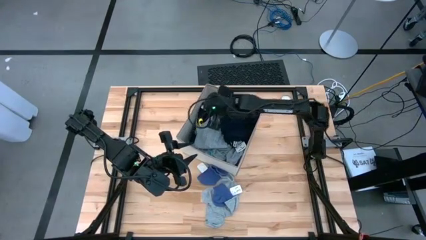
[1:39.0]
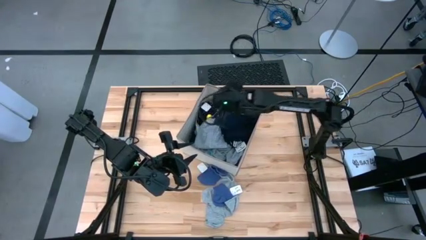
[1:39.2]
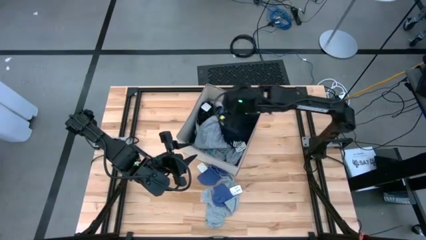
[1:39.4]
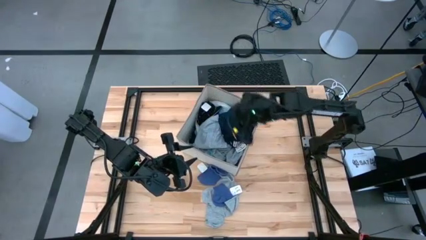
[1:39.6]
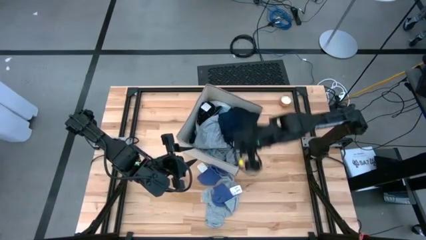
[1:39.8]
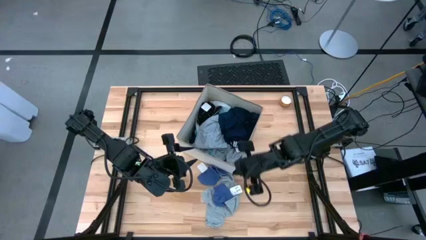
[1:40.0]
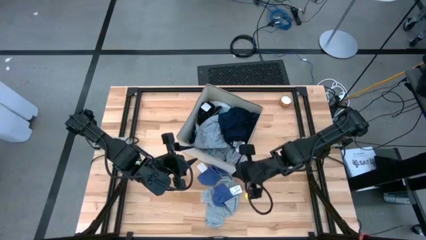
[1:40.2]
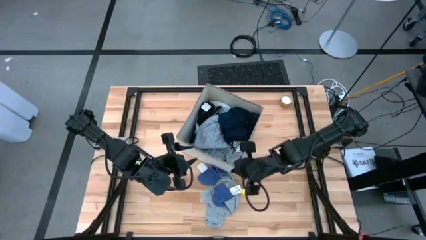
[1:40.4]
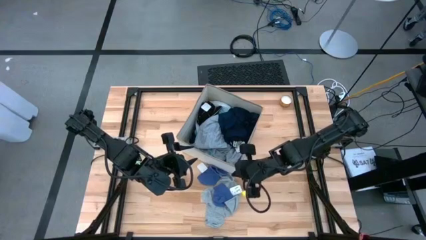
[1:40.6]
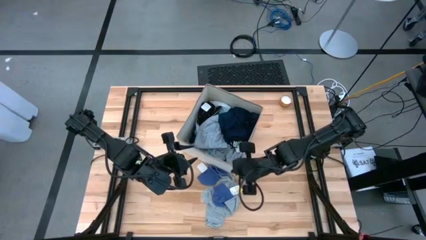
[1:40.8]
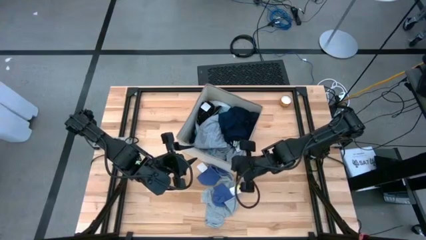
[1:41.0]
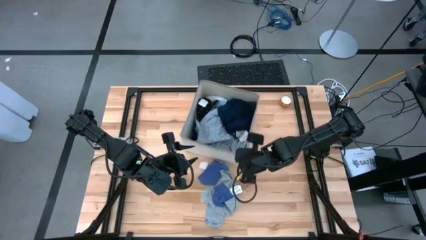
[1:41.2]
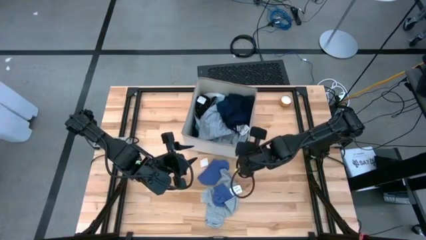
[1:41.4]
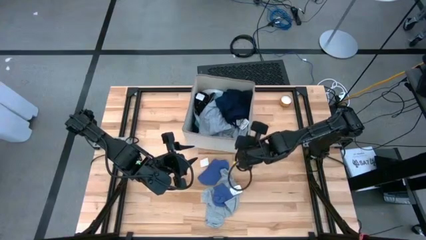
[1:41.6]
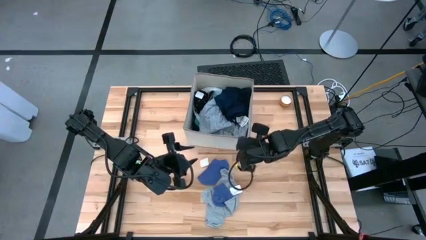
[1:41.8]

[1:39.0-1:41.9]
Task: Sort clothes
Move the bin to the top of the table

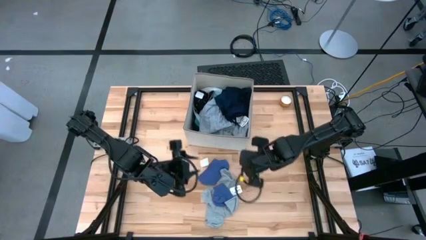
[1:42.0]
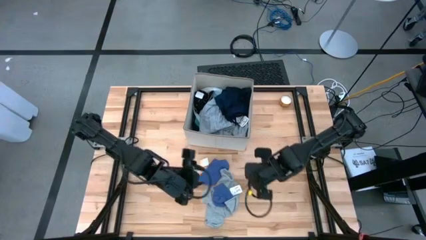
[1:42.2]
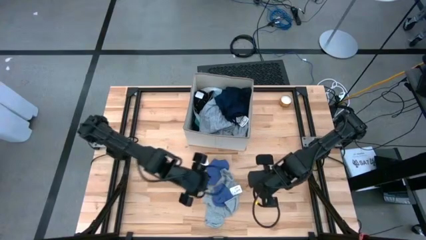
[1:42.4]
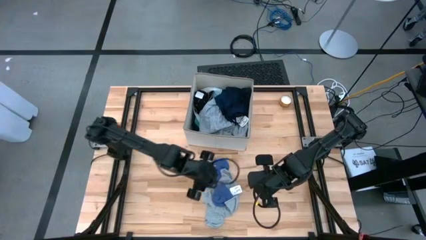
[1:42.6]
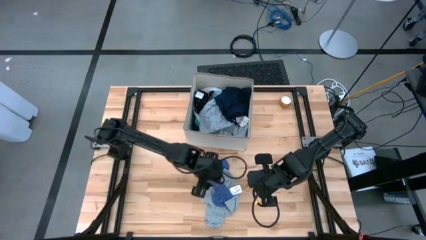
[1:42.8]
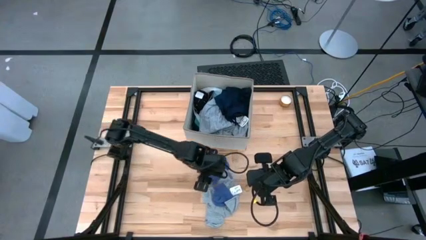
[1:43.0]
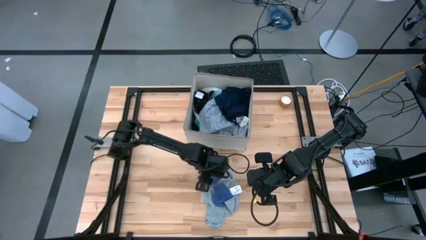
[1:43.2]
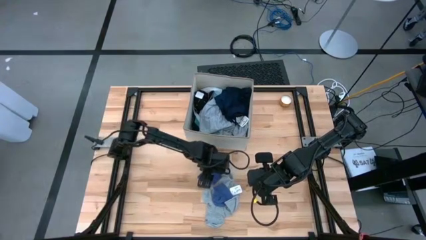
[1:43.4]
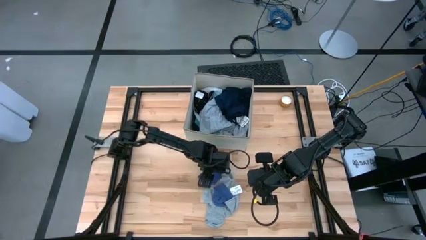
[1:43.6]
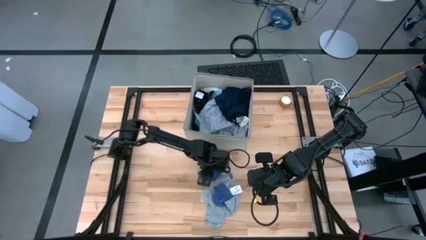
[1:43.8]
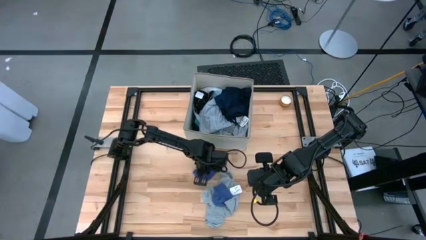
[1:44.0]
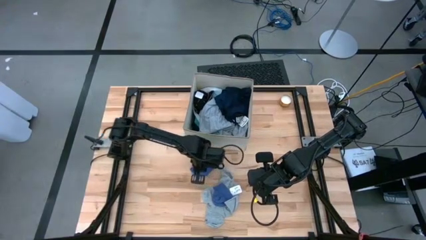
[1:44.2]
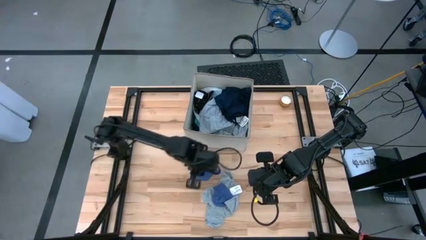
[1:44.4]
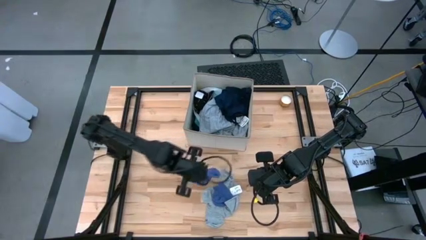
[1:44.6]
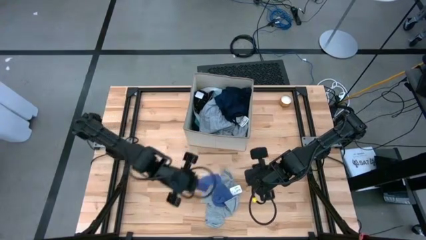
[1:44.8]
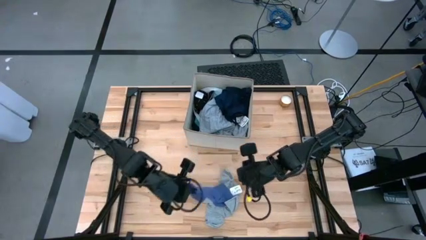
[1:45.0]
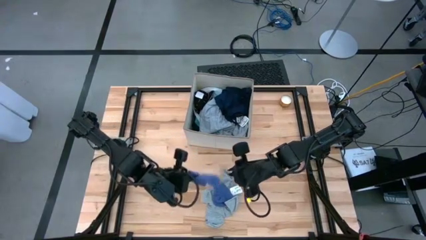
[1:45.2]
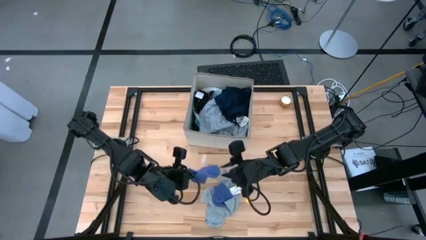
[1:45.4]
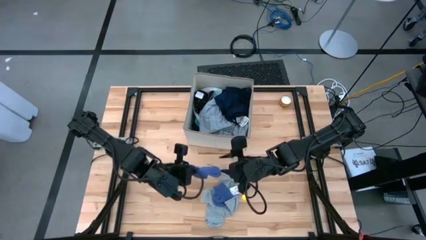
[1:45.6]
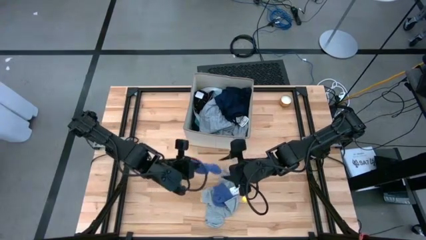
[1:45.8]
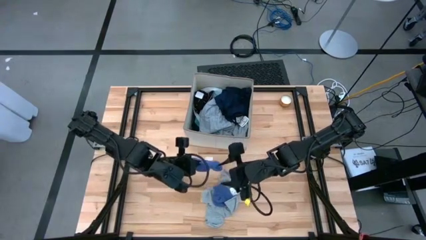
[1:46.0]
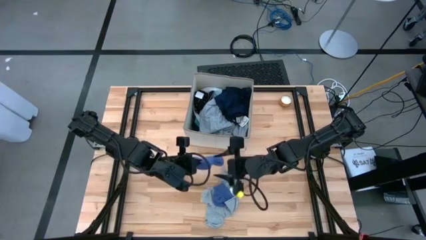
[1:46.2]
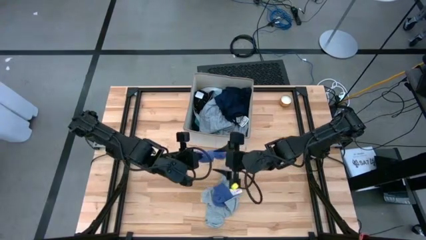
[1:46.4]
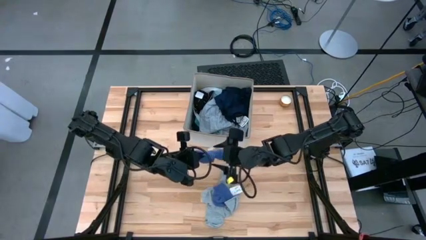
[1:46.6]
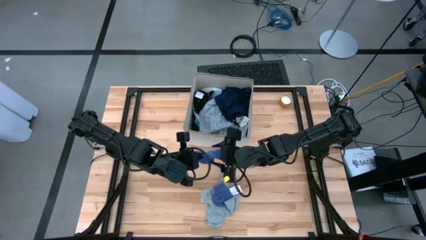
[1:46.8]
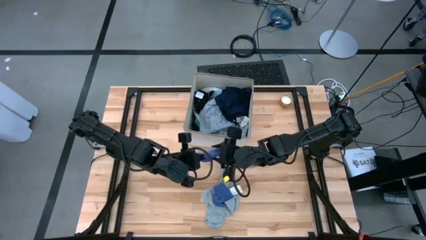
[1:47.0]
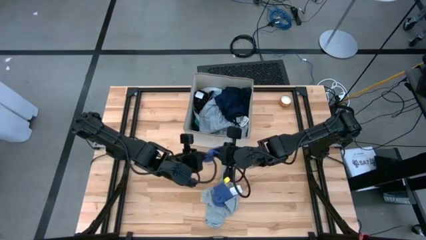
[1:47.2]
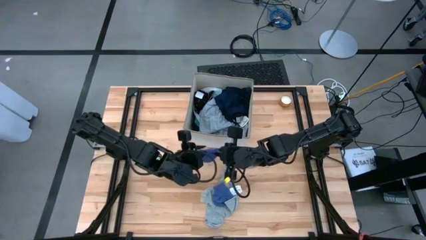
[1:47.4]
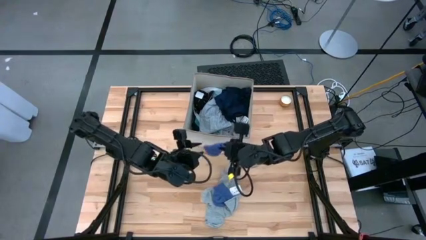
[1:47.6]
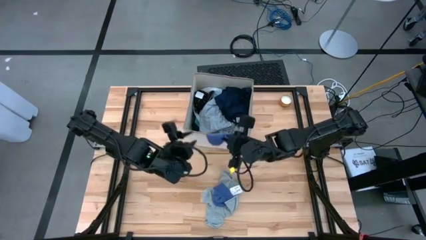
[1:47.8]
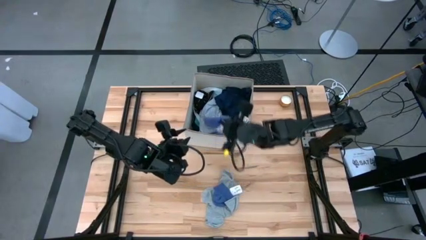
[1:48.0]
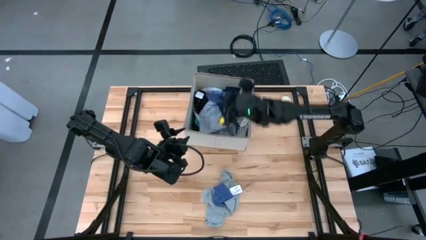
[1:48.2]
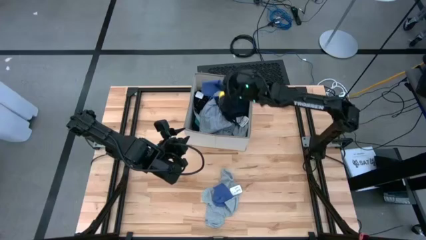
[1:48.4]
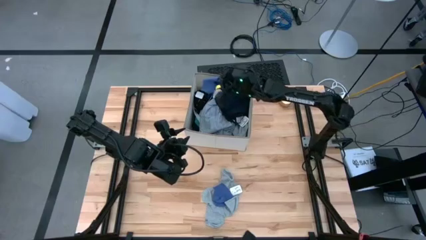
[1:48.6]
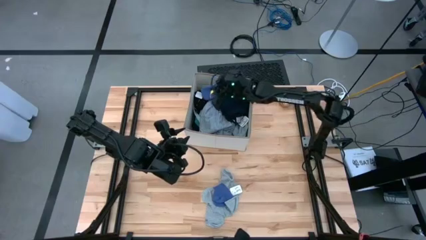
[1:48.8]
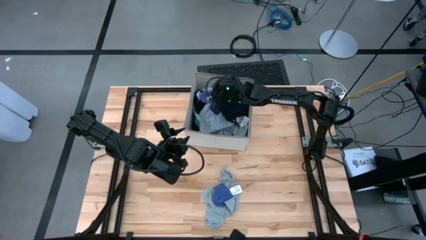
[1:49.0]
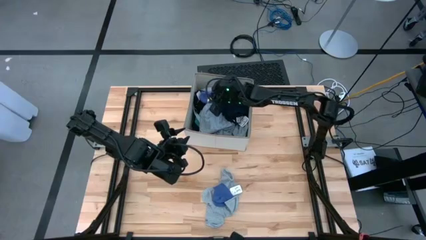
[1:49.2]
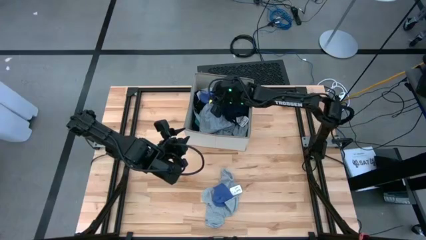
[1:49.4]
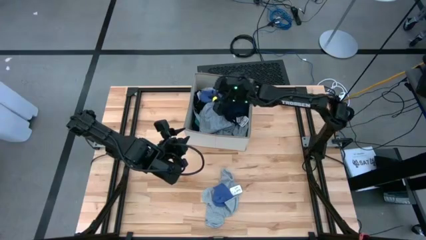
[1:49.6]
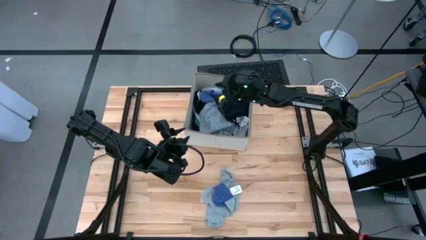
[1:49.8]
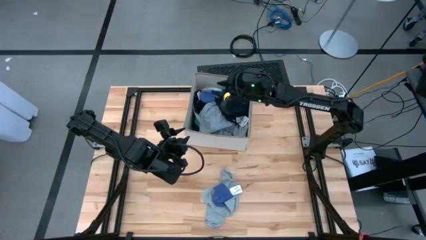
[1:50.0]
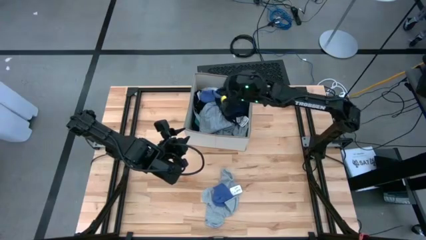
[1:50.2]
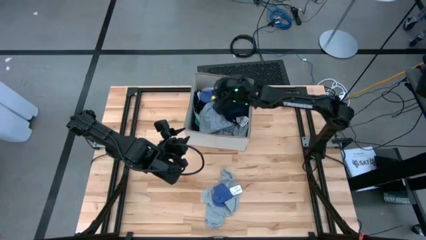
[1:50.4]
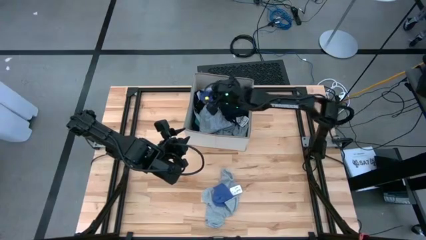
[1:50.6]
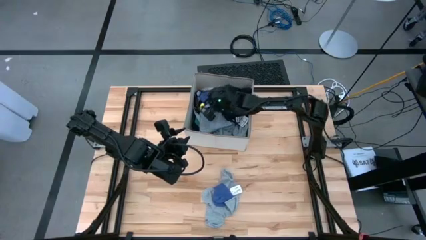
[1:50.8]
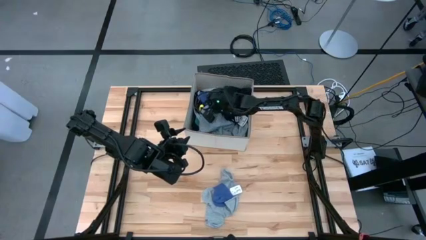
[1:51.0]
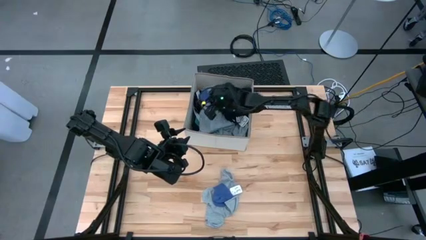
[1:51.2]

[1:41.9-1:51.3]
Put the top blue sock into the laundry bin

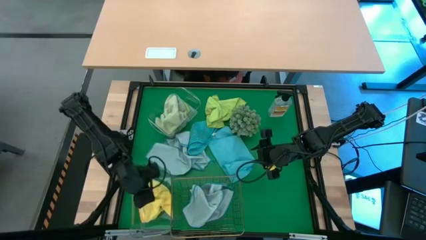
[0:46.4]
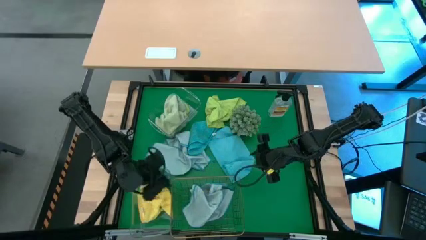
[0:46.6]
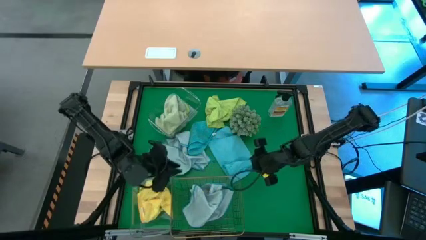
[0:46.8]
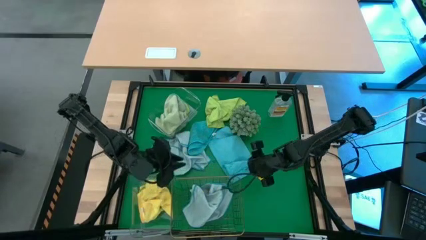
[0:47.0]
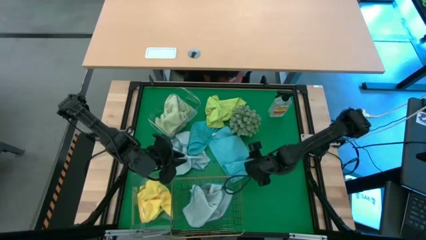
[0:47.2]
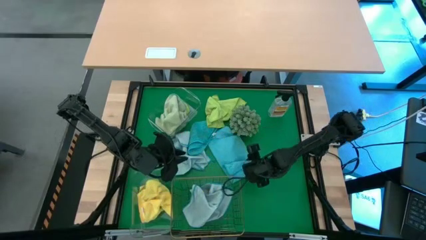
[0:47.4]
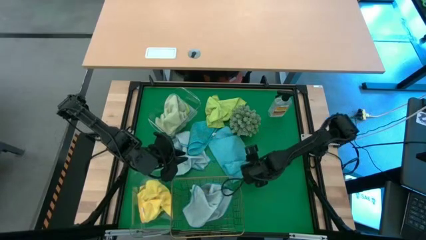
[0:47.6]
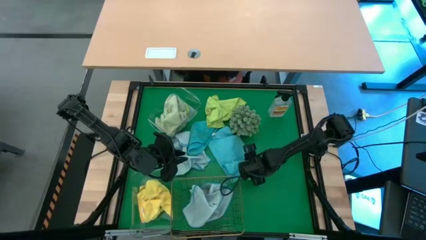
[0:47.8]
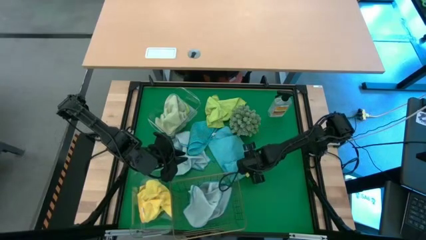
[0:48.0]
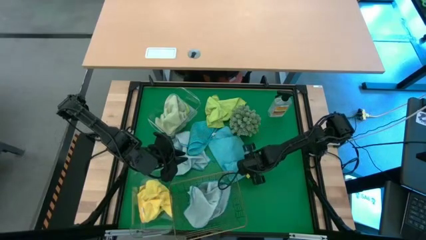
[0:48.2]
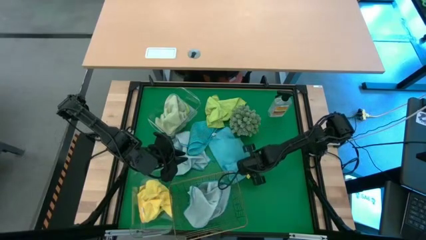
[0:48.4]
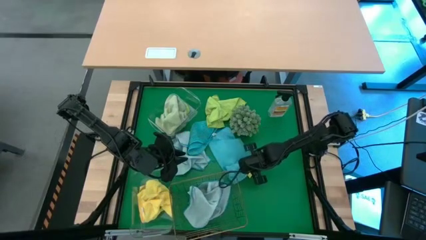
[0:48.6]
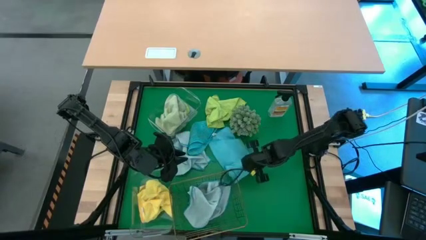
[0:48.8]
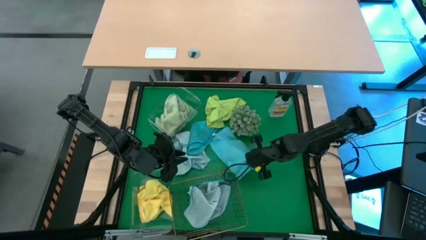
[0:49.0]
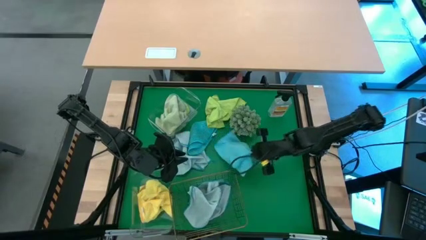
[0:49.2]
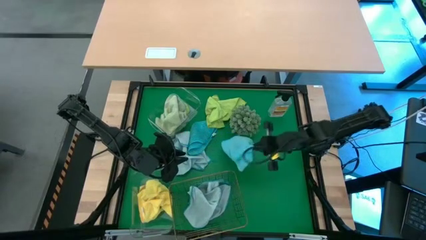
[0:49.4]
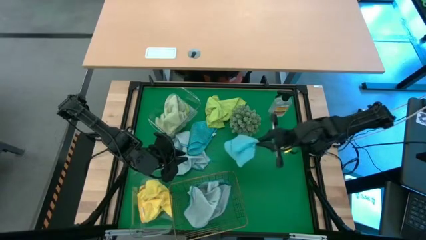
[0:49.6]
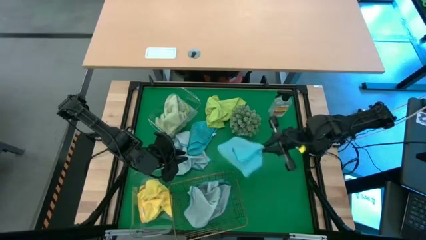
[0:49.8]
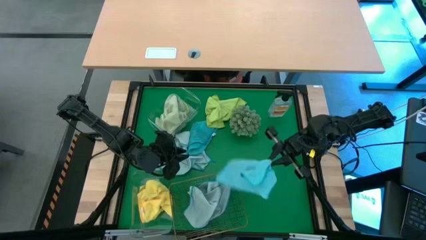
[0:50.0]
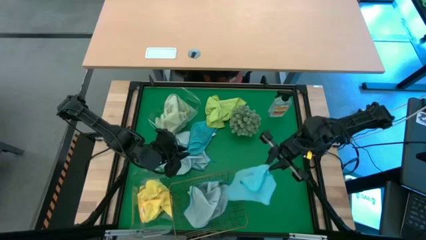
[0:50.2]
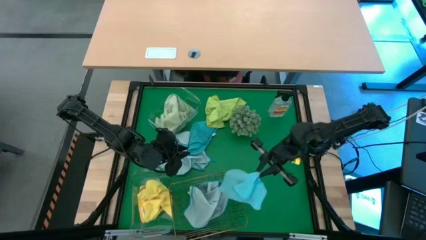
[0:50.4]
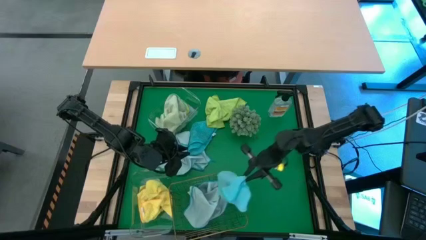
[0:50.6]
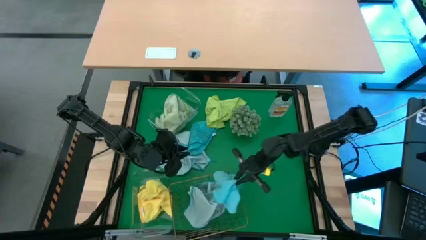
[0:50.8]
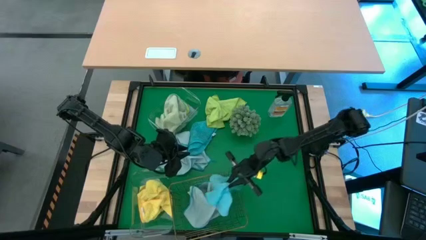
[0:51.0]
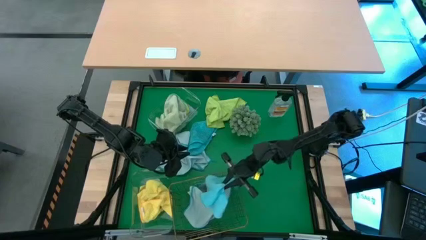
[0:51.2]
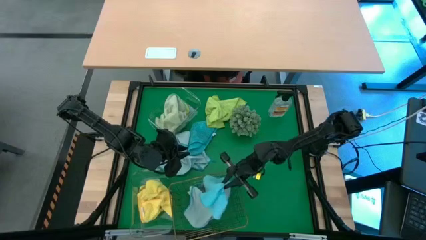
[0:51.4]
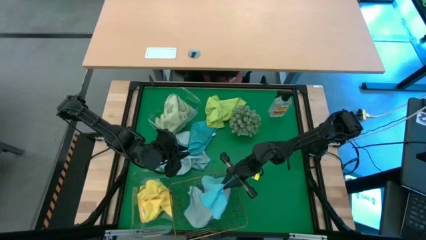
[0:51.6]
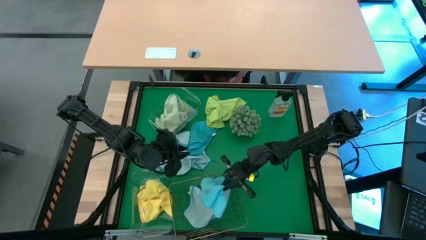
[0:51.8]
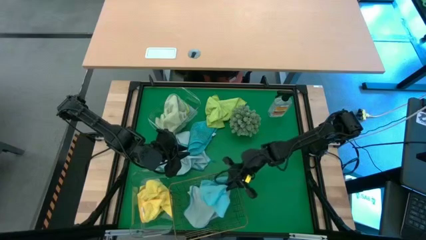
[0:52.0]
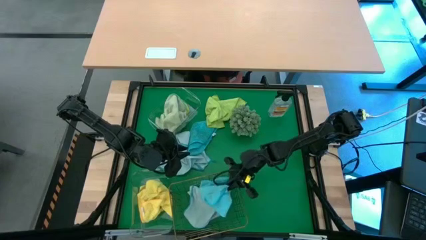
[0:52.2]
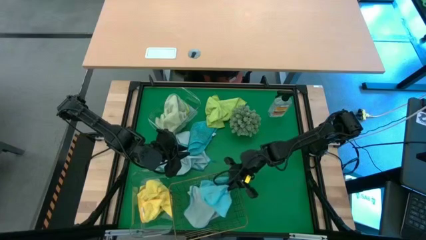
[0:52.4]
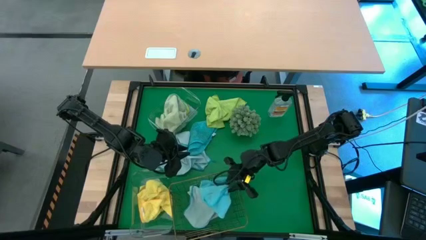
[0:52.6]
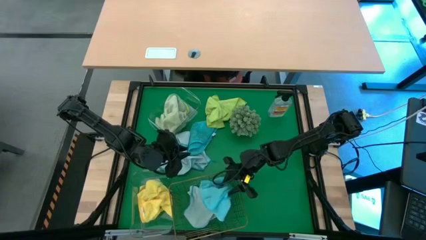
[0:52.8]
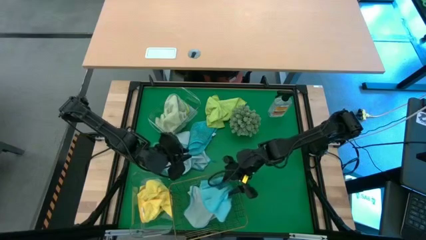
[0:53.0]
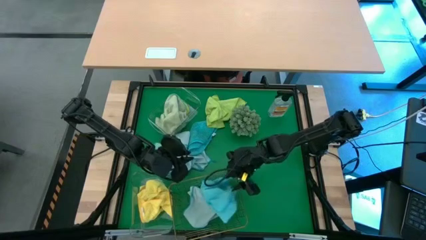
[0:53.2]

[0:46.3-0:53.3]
Task: Sort microfiber towel by color & place in baskets
Put the right blue microfiber towel into the wire basket
